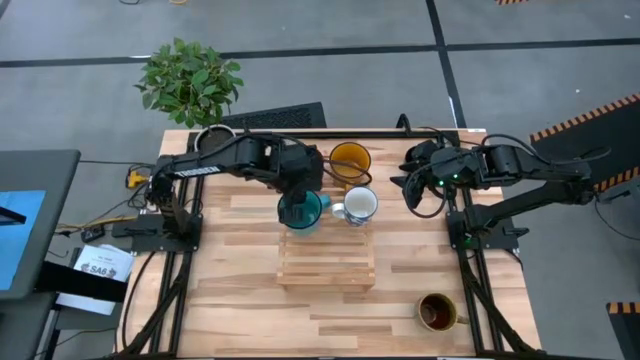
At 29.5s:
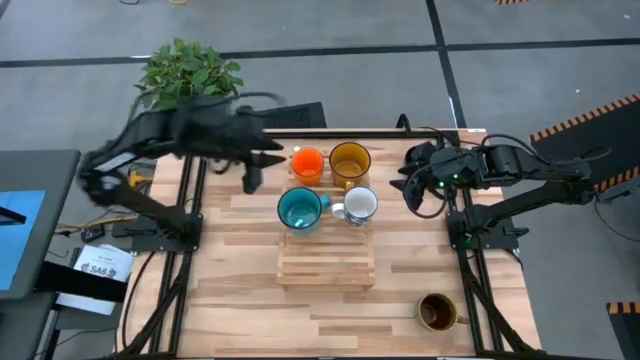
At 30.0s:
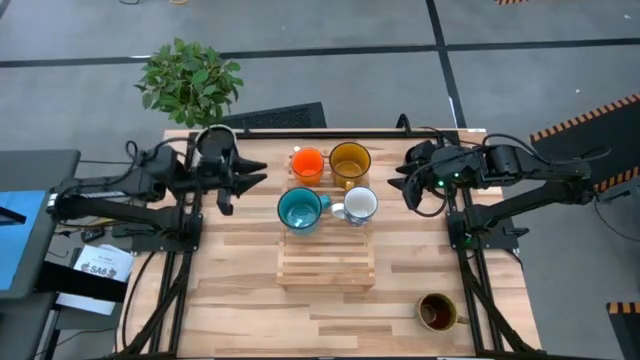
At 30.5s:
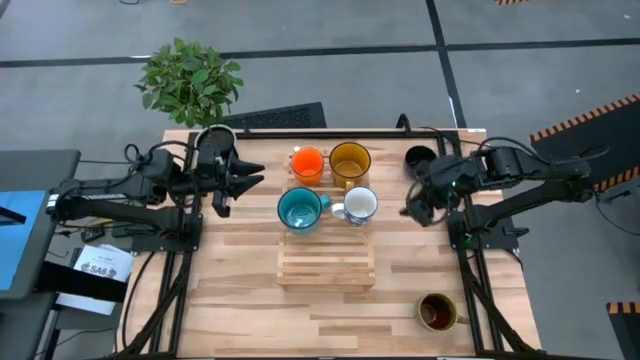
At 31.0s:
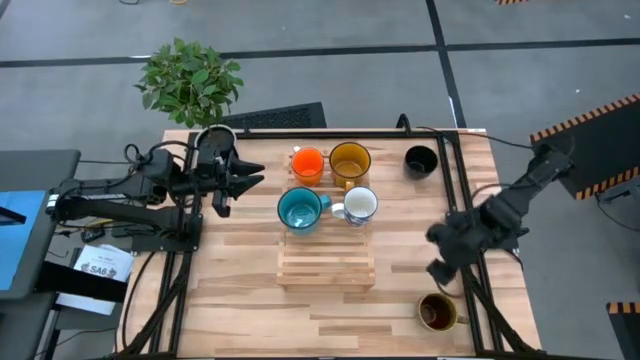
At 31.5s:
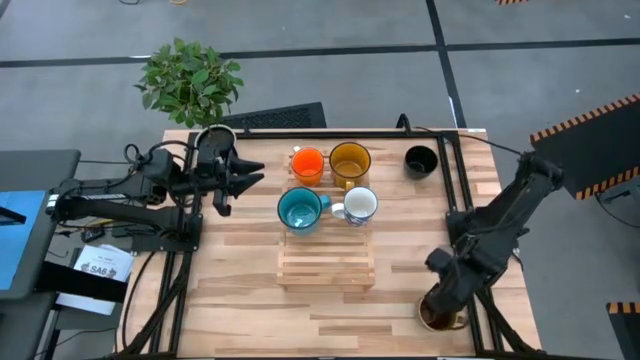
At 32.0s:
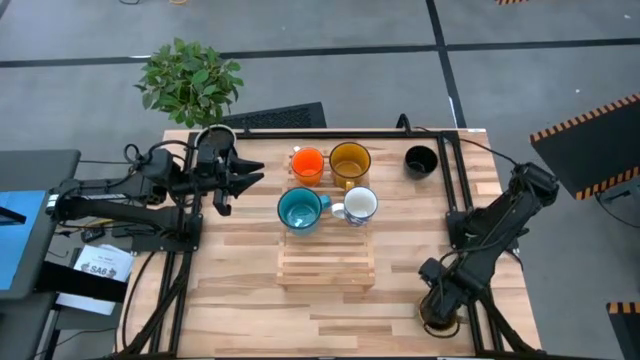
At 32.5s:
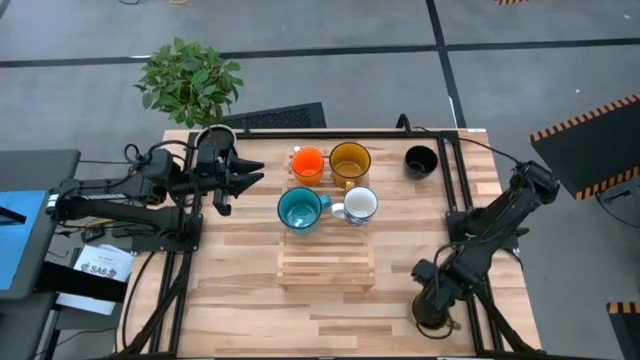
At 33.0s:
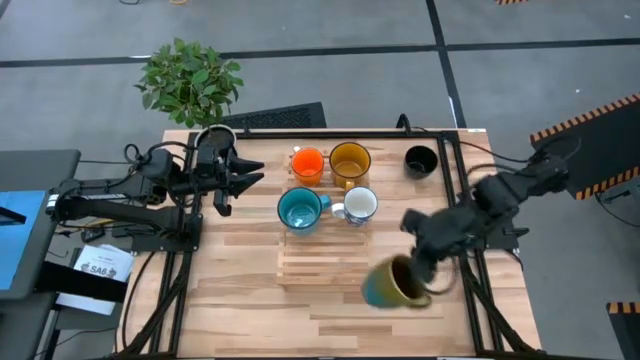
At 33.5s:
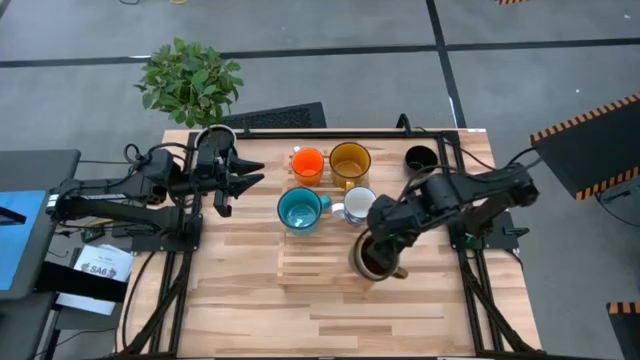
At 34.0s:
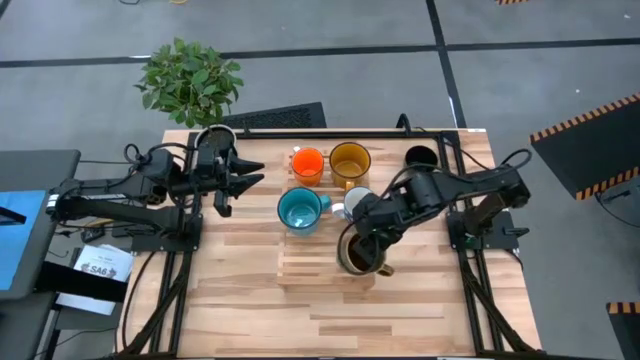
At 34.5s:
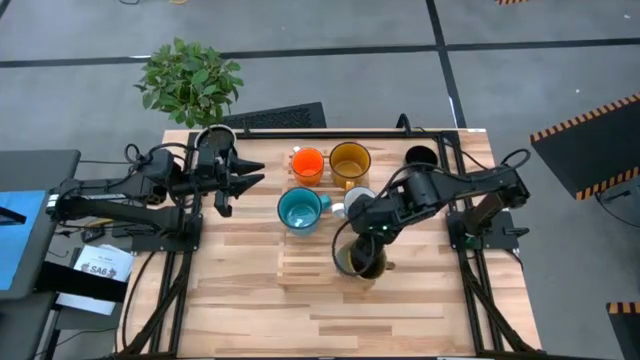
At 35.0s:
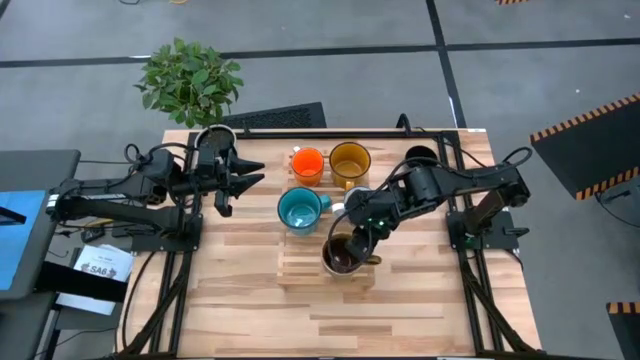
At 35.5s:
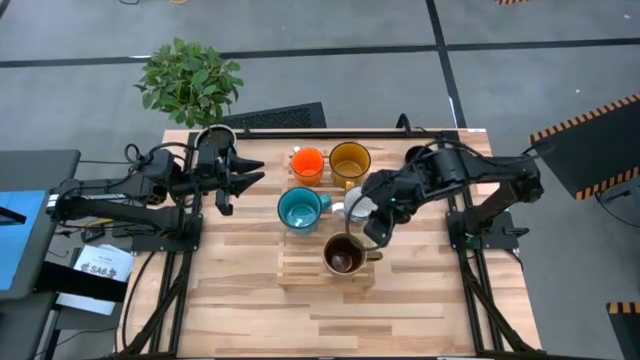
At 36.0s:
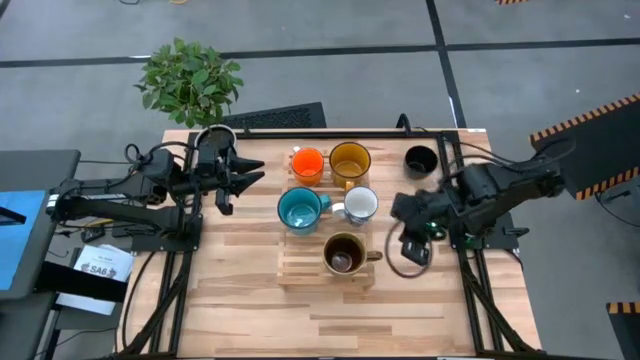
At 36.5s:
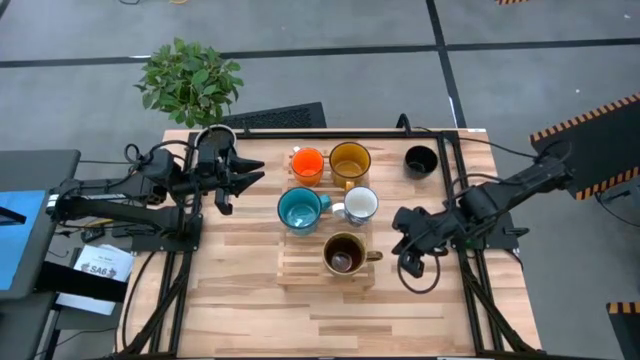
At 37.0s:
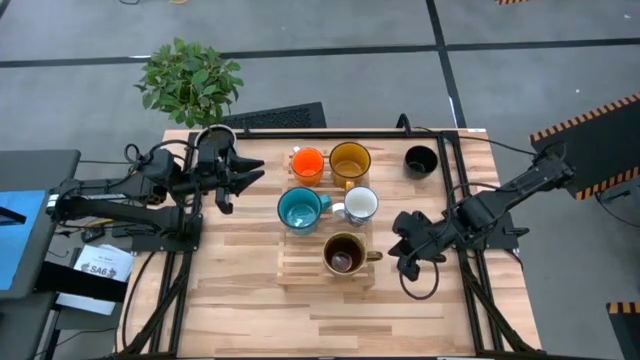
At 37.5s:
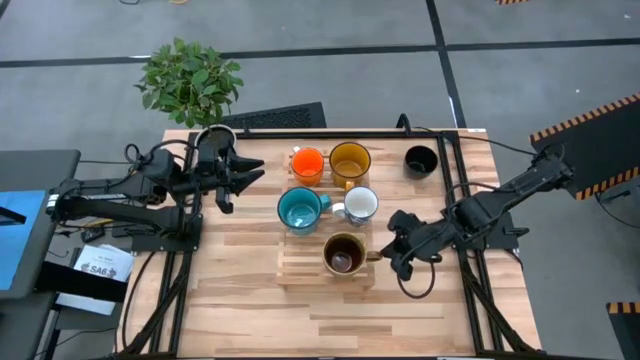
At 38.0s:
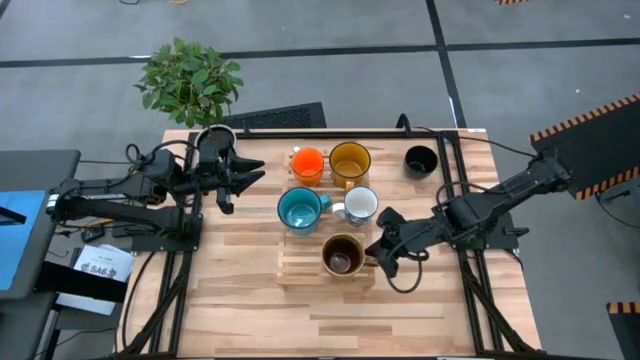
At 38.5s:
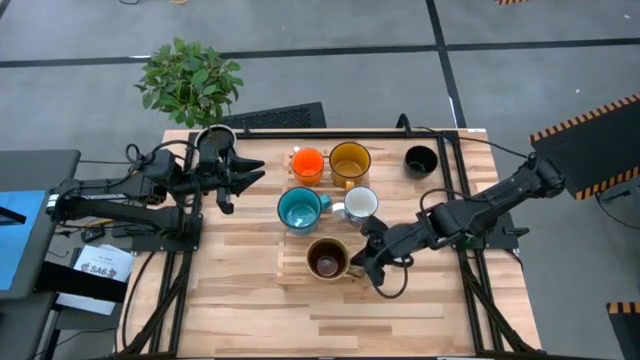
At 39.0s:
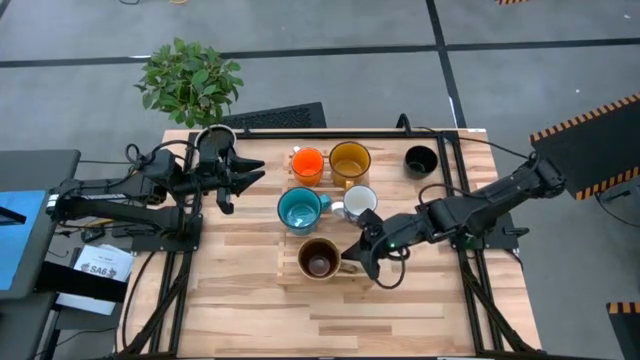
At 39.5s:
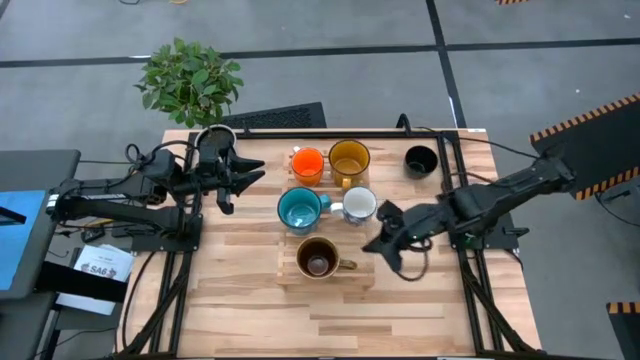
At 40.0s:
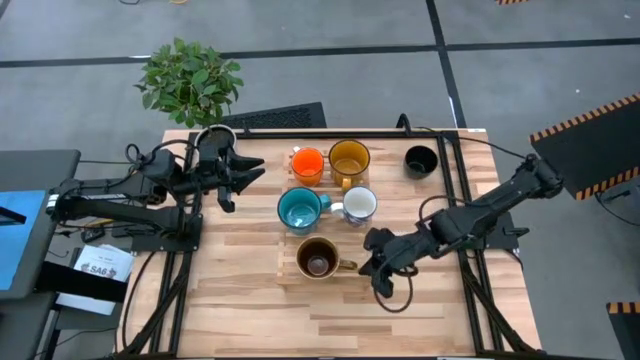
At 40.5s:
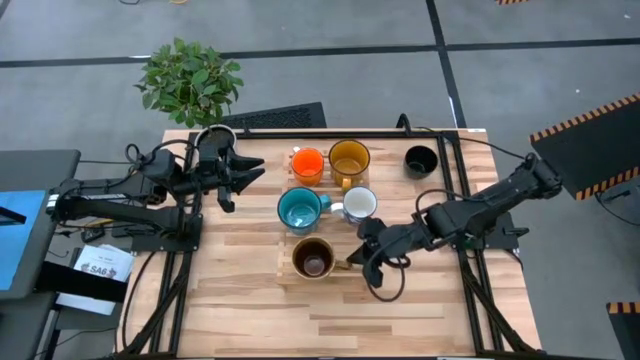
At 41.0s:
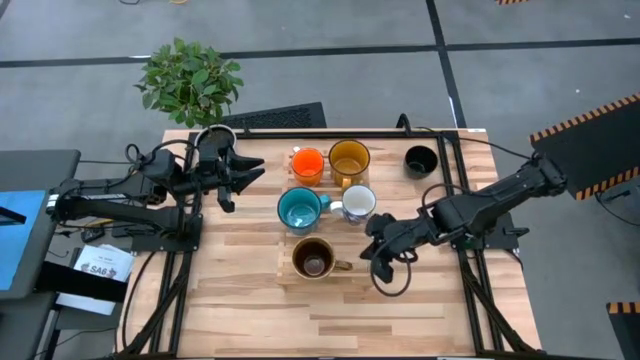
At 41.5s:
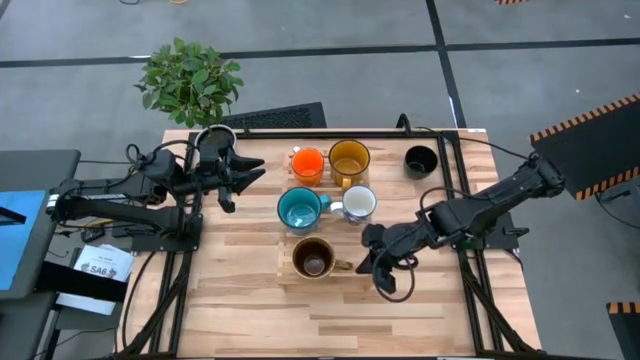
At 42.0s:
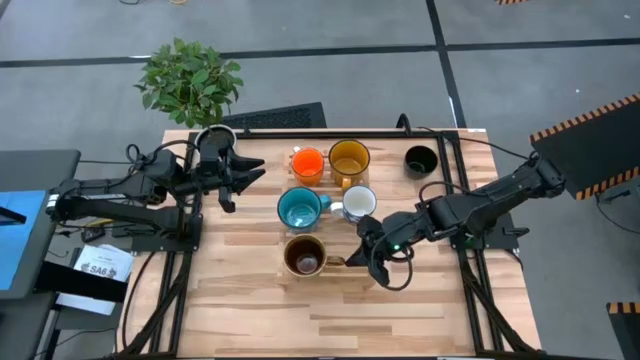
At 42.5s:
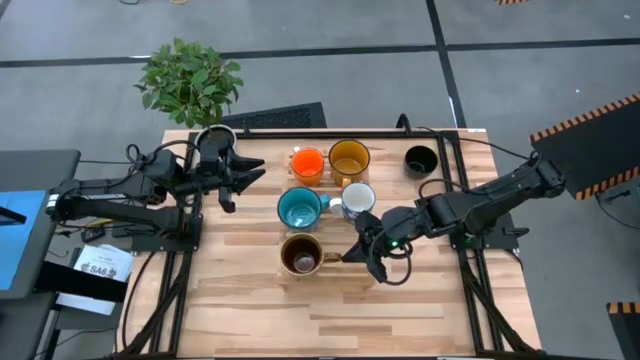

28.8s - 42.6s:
Task: Place coffee mugs
Put the green patterned mug on the shelf

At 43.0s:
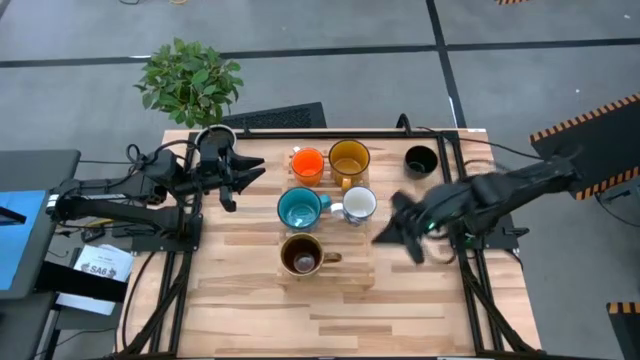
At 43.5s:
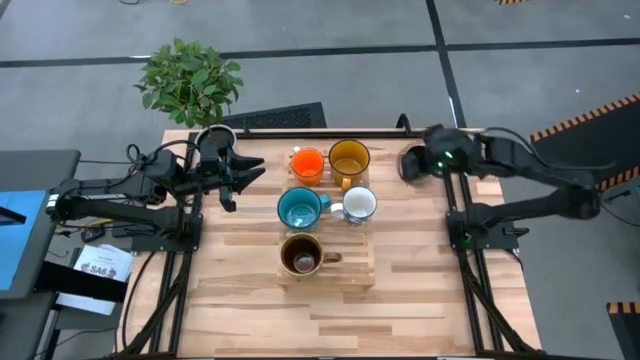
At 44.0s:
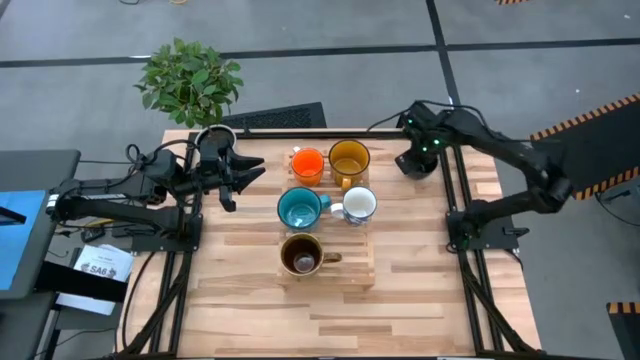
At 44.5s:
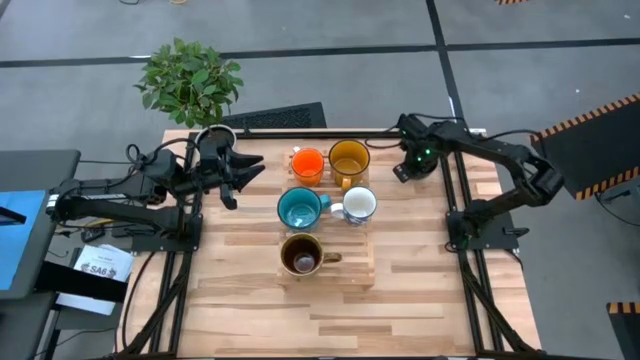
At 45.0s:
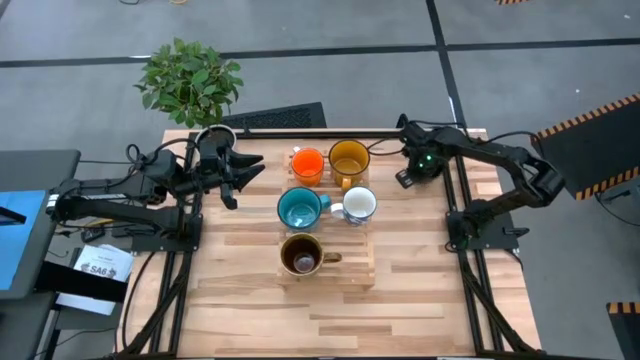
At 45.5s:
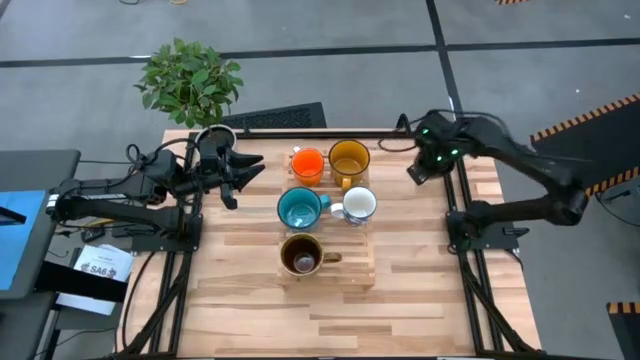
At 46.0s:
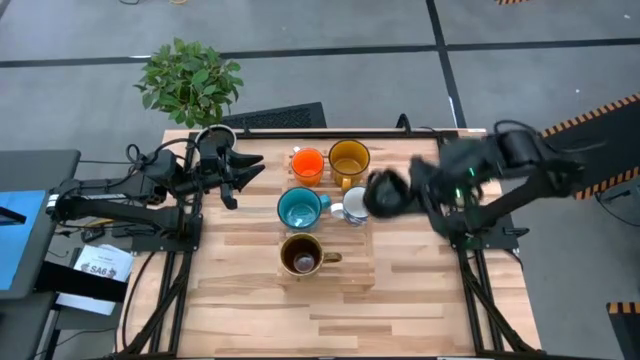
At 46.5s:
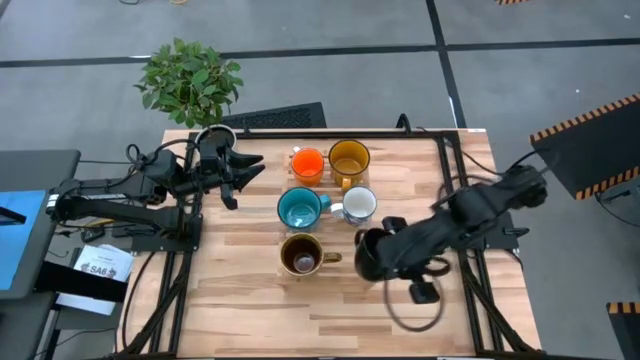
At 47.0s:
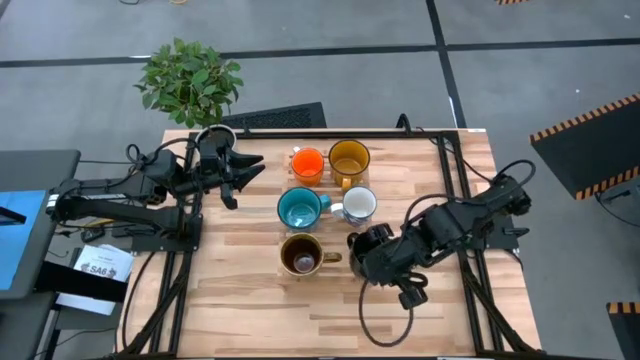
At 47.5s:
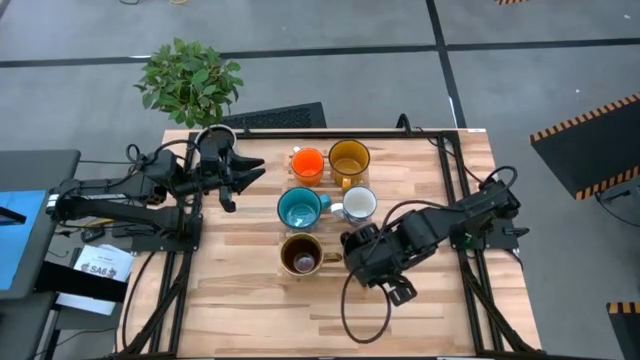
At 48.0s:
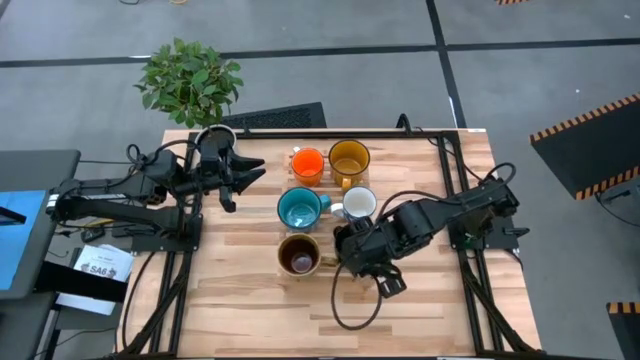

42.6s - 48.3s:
Put the black mug on the shelf

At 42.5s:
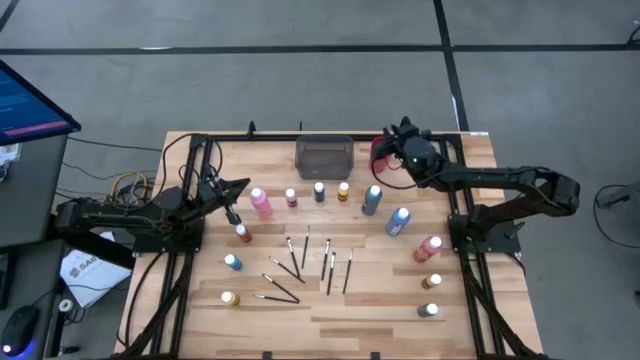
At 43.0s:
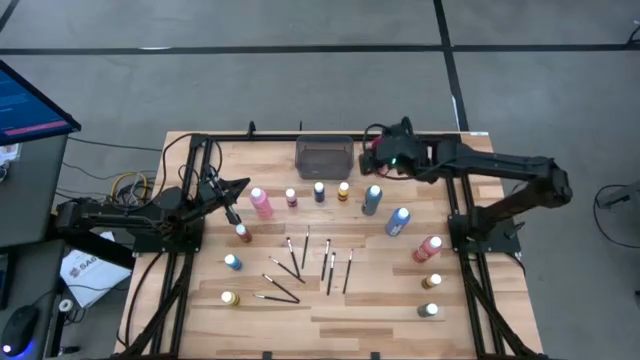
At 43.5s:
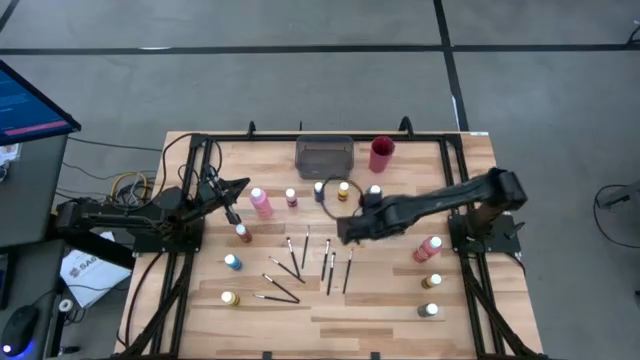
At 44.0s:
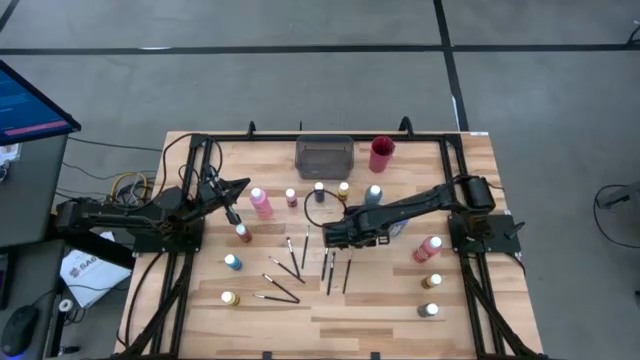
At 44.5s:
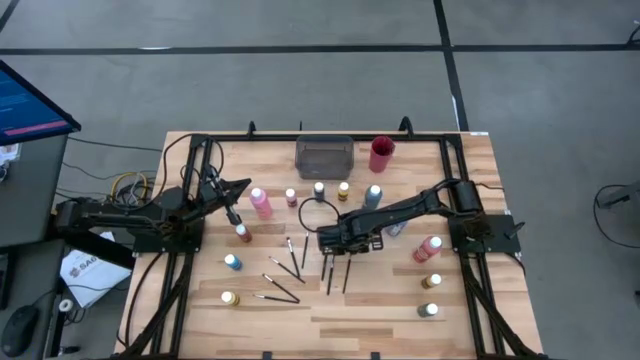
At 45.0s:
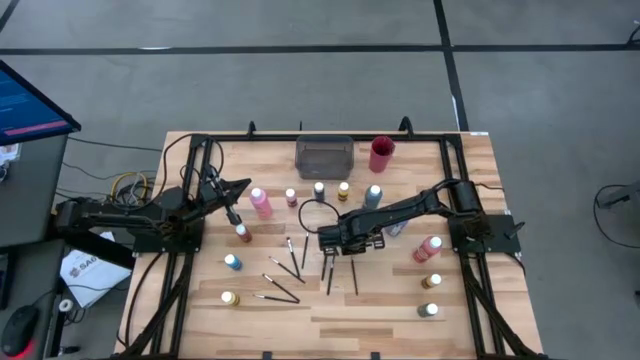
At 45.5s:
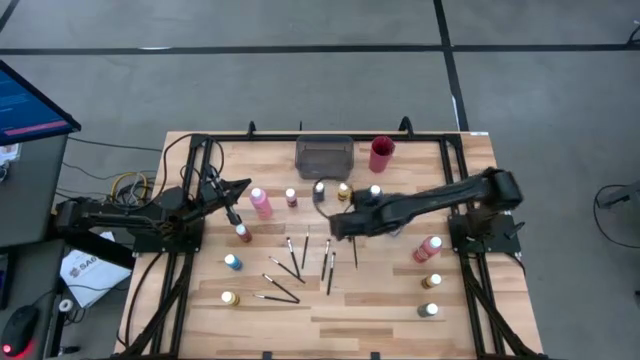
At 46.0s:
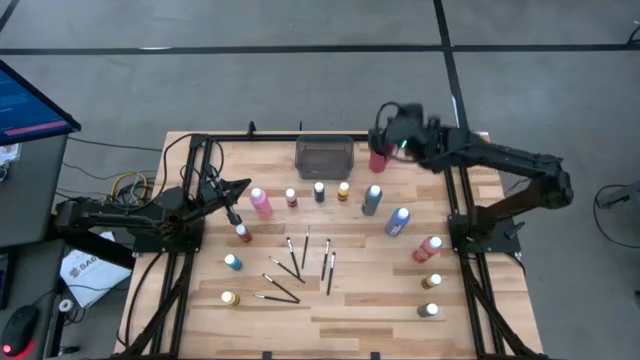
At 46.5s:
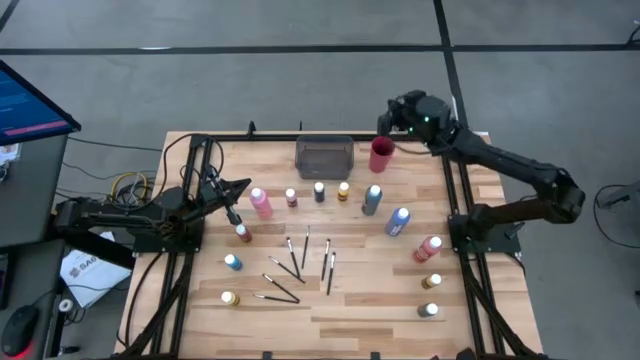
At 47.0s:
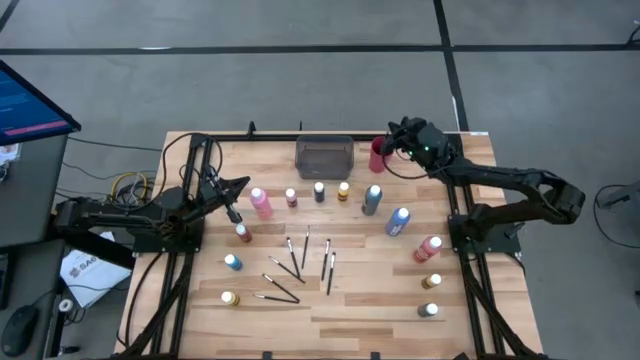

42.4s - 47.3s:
Task: Pick & Place Paint Supplies
Put the black paintbrush into the red cup
